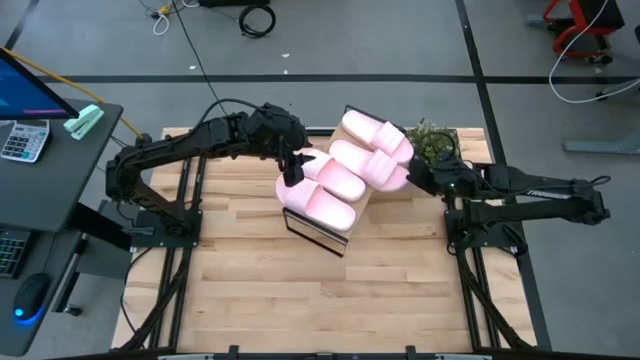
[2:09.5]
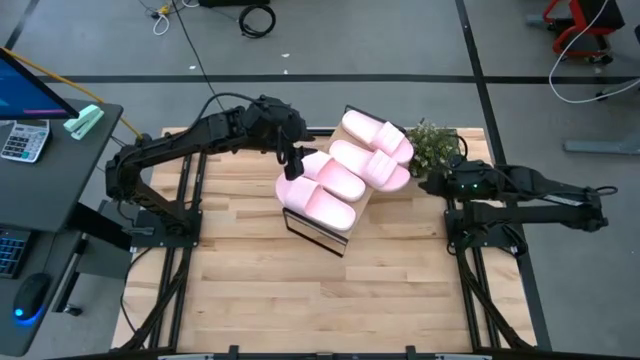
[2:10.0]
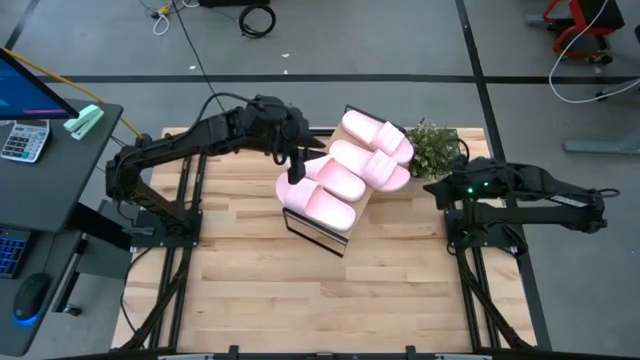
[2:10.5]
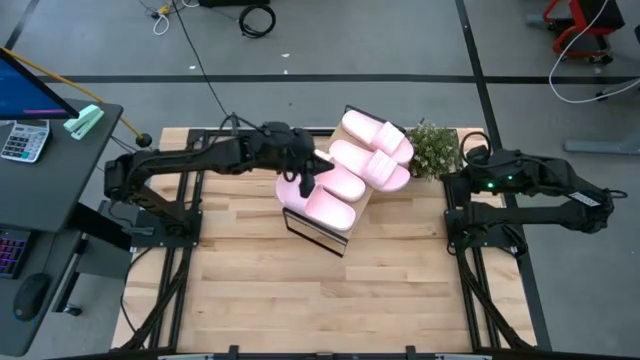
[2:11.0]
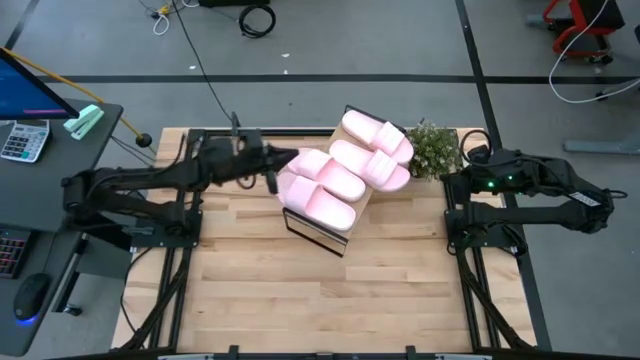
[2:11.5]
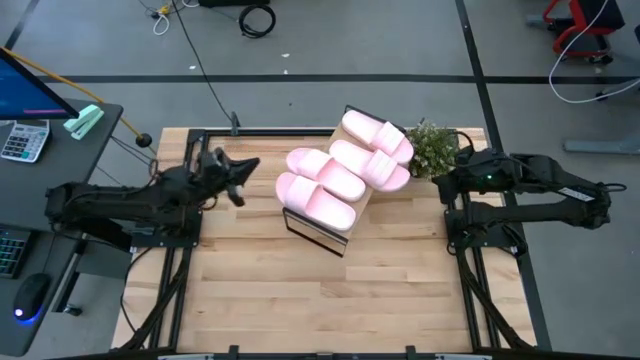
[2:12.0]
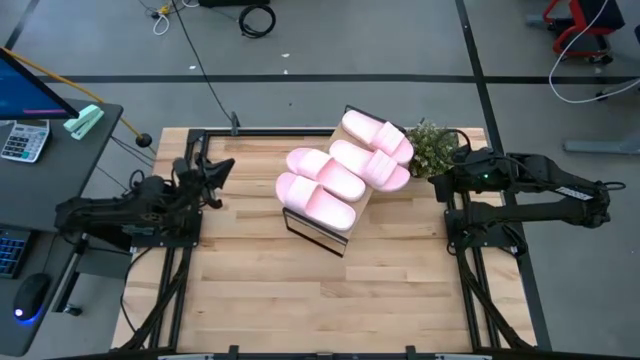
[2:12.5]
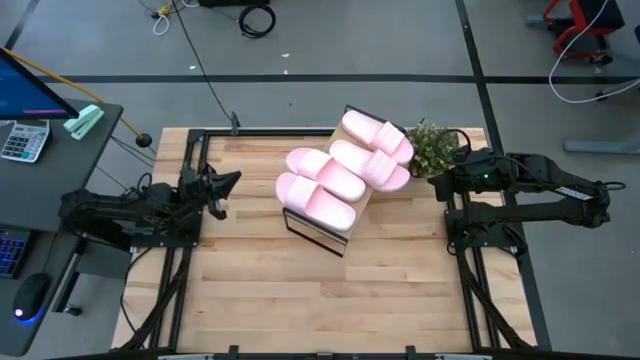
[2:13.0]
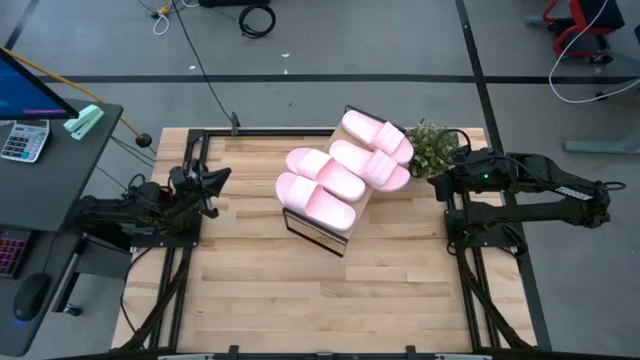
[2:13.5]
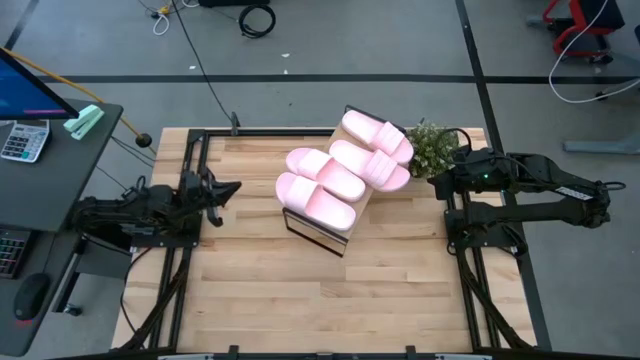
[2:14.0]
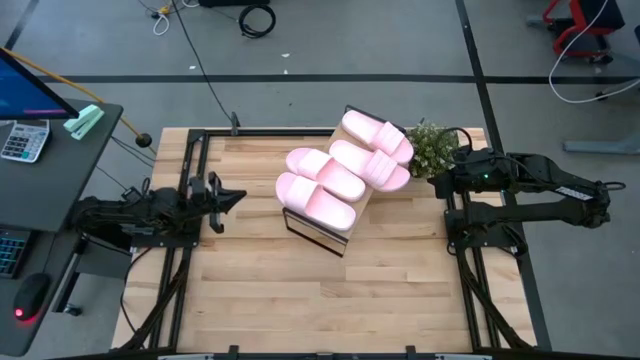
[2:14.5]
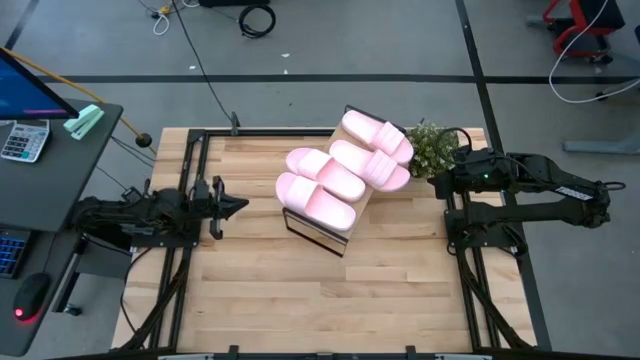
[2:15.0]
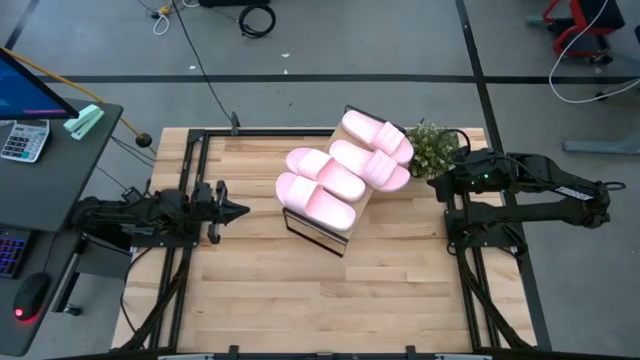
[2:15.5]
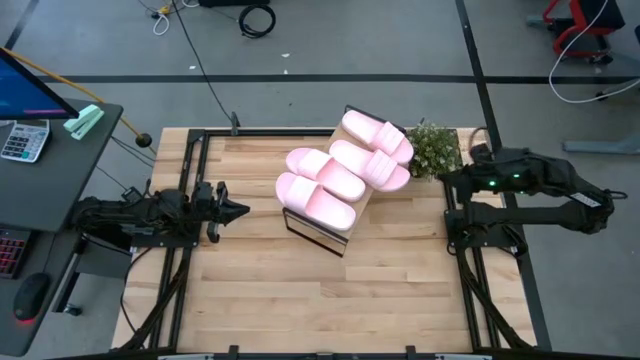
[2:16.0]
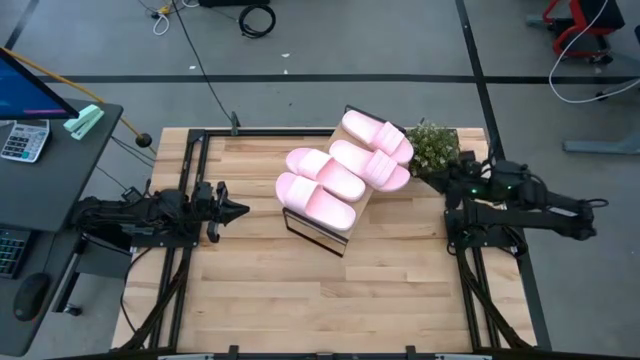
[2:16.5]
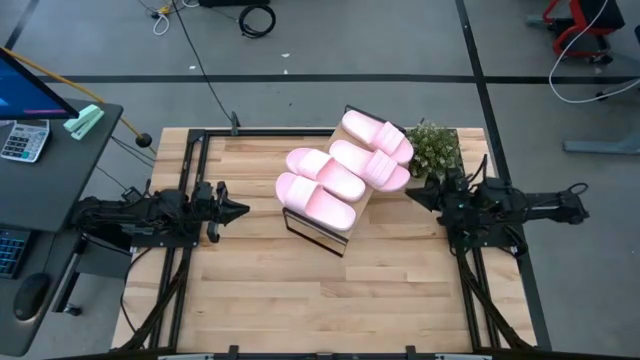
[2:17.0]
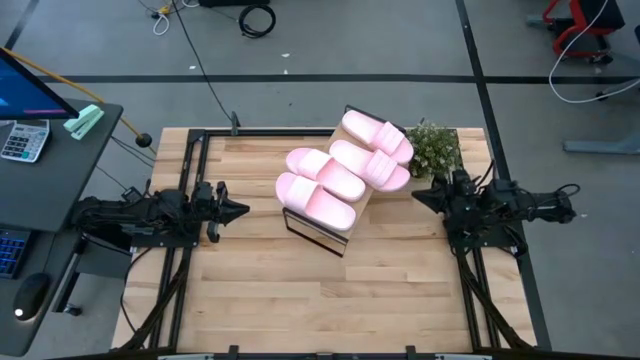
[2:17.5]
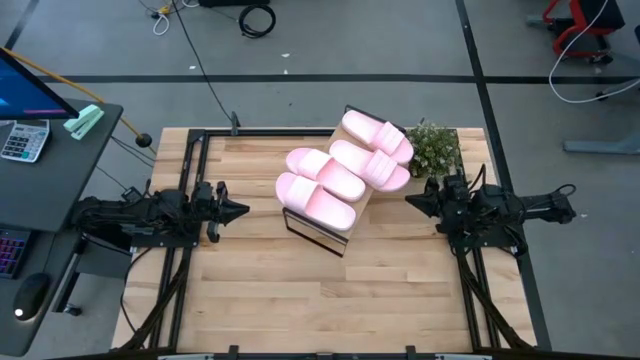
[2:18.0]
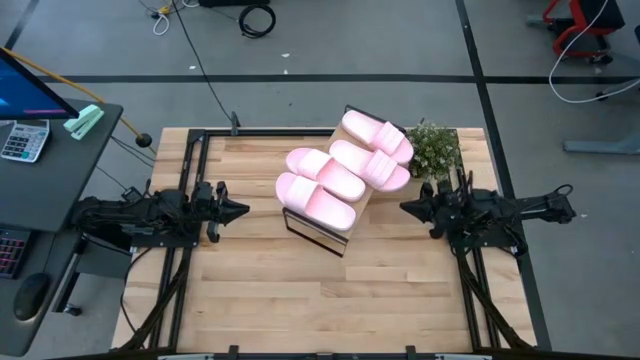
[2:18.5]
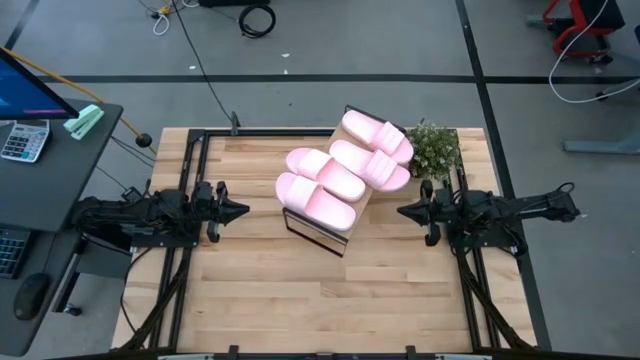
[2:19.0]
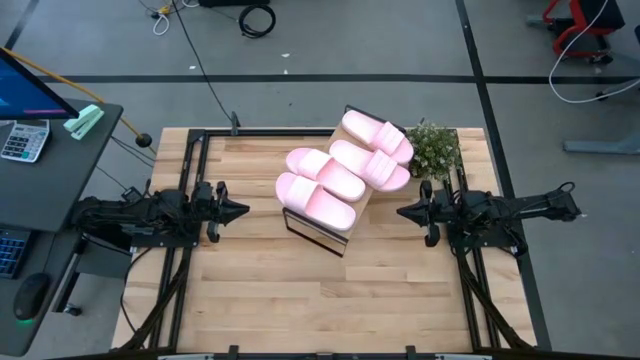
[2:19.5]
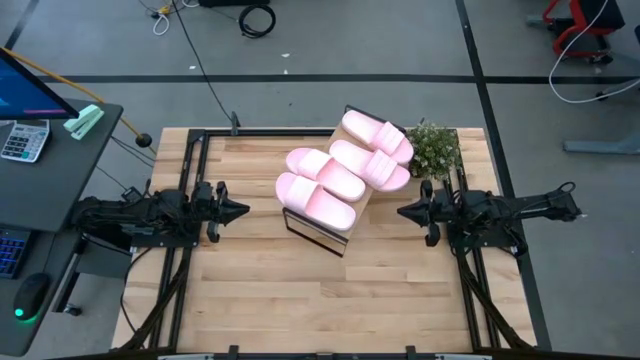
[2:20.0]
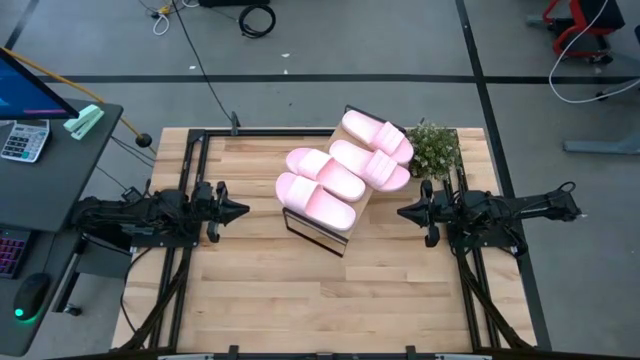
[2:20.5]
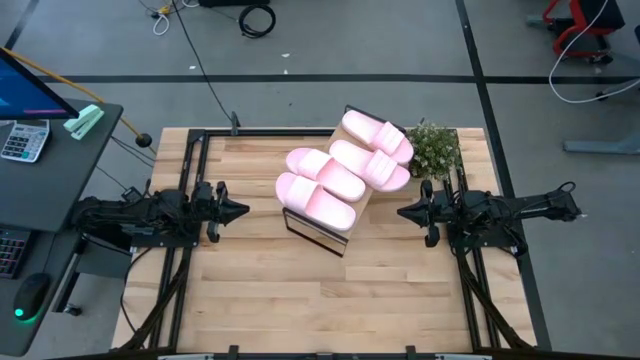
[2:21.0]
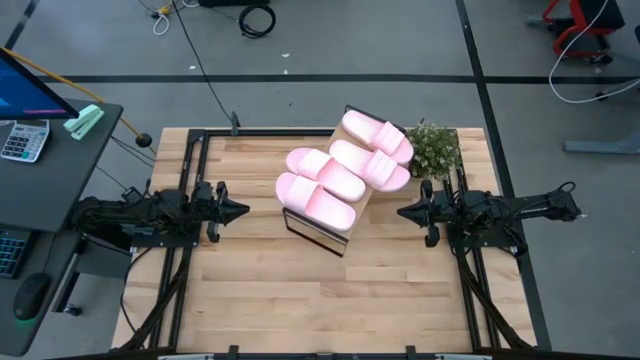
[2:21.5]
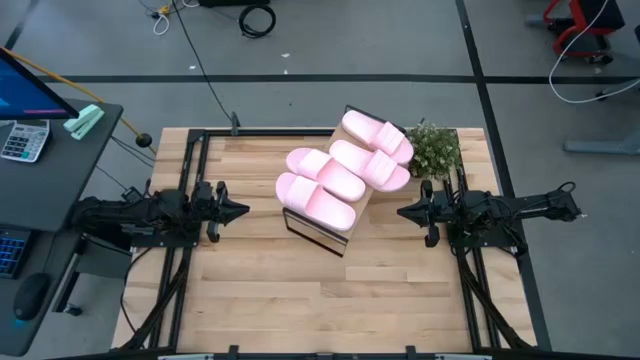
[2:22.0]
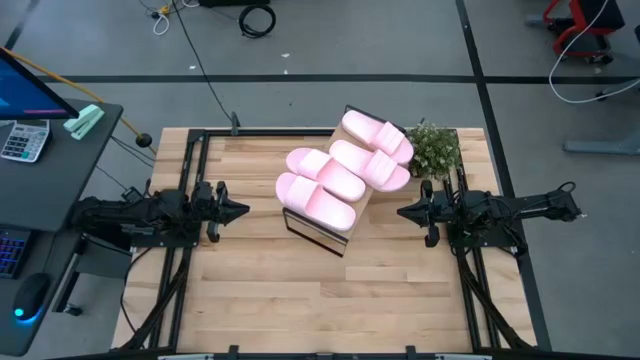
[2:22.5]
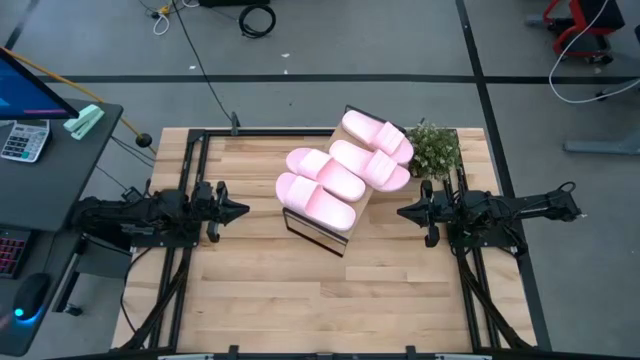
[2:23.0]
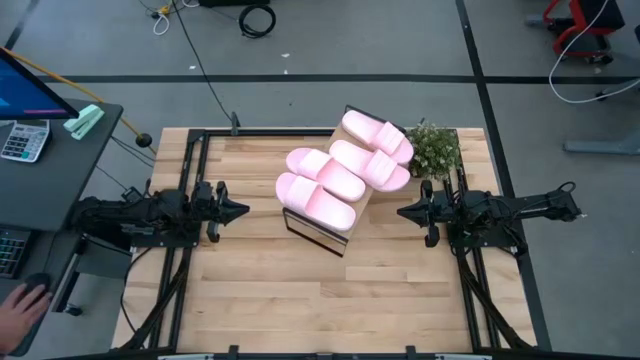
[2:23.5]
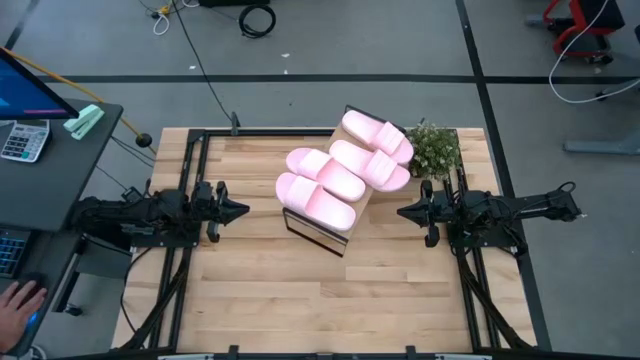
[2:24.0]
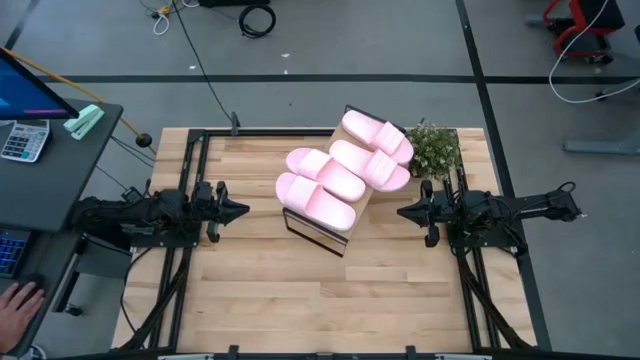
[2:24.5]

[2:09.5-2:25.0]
Task: Pick and place slides into the shelf
Return to Home Position

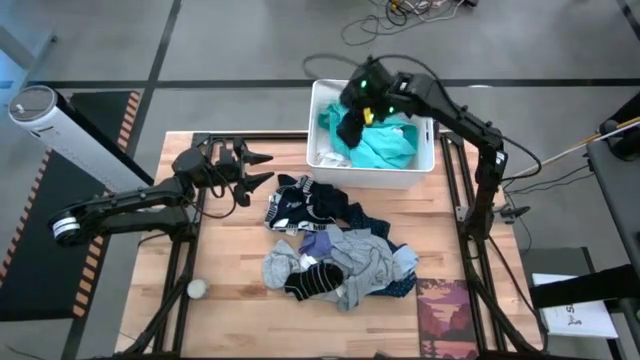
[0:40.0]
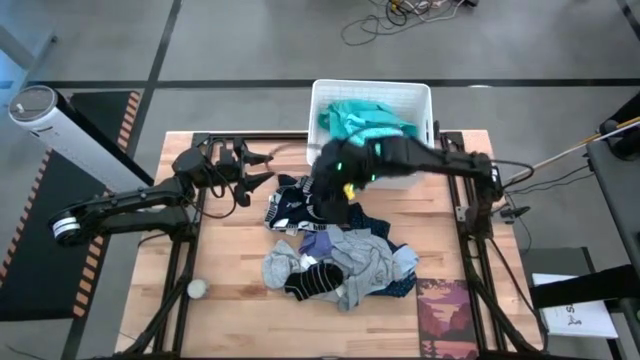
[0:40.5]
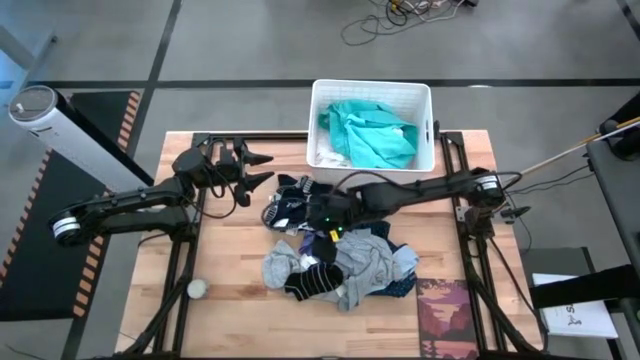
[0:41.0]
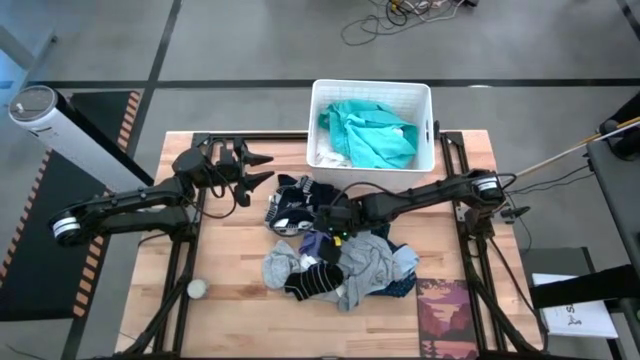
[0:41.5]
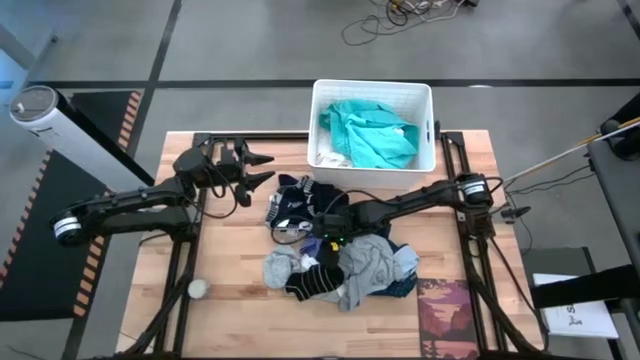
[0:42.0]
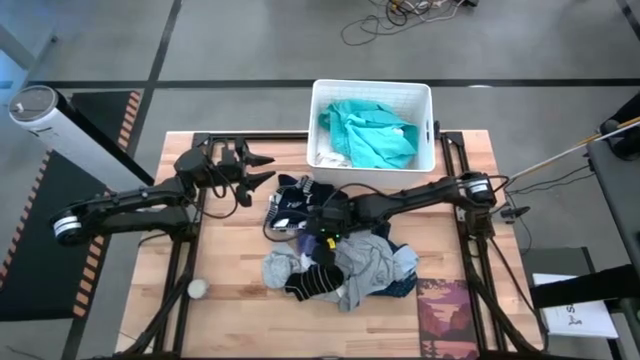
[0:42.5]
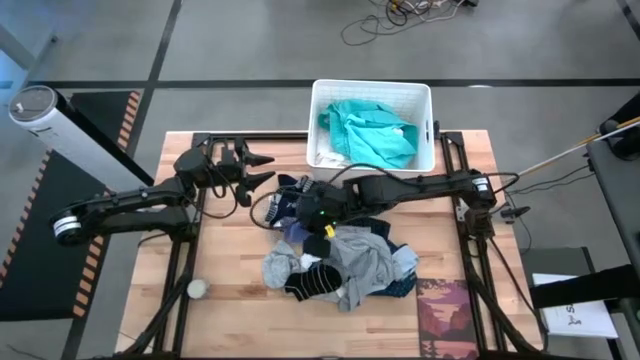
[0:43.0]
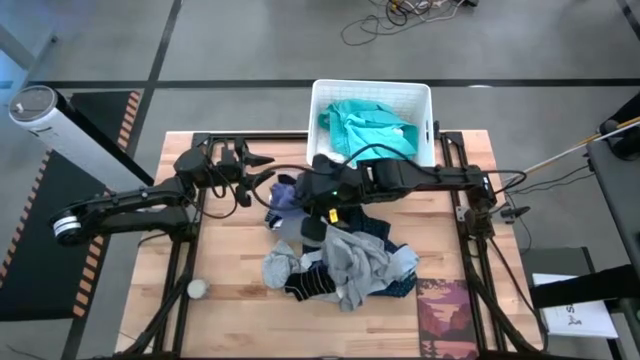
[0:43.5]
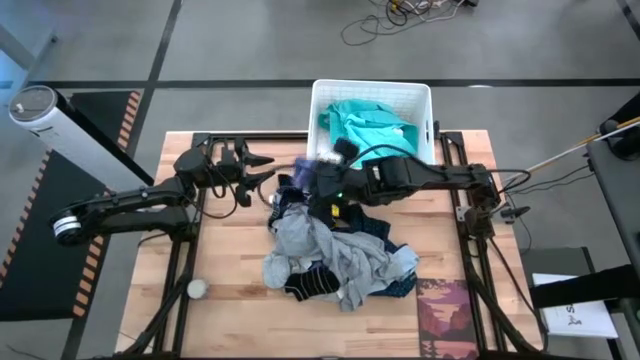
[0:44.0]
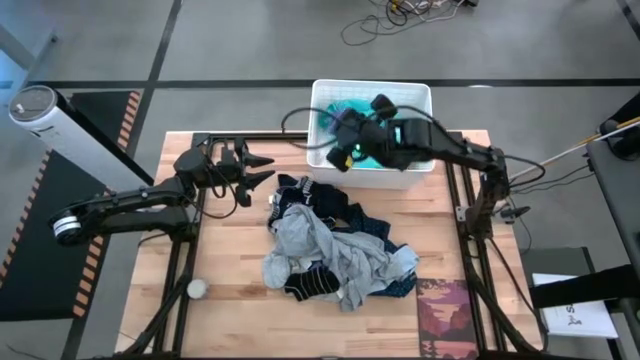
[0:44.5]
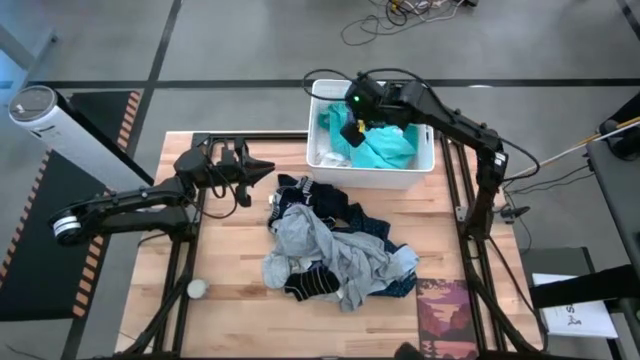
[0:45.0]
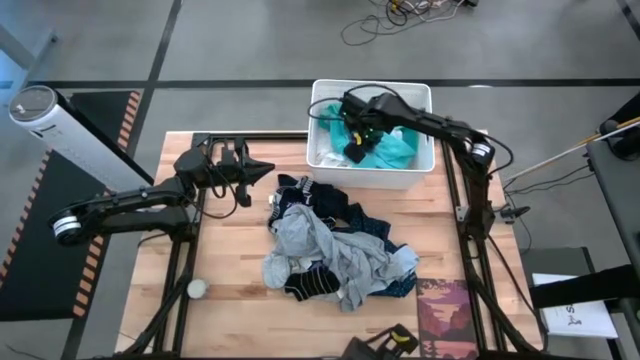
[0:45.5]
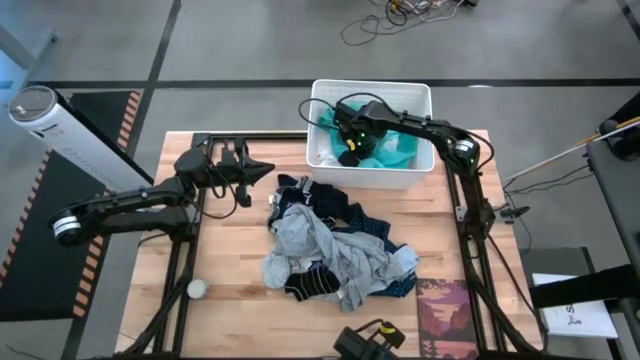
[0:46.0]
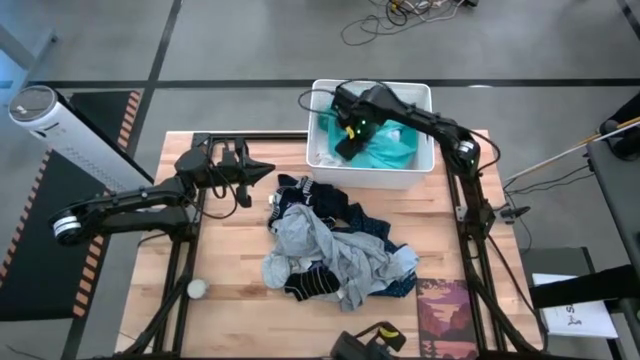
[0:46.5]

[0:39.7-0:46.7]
Task: Sort clothes
Put the violet sock into the white laundry bin
